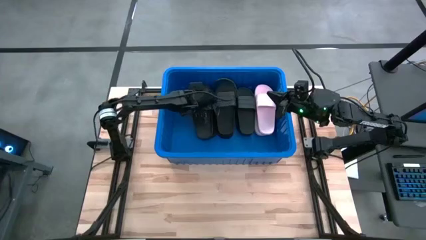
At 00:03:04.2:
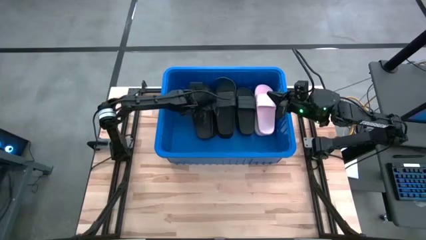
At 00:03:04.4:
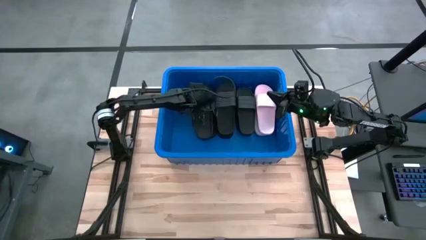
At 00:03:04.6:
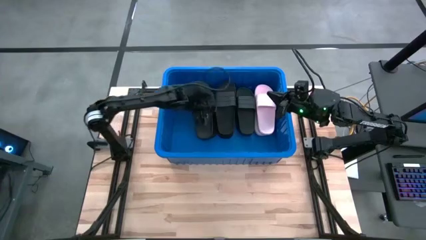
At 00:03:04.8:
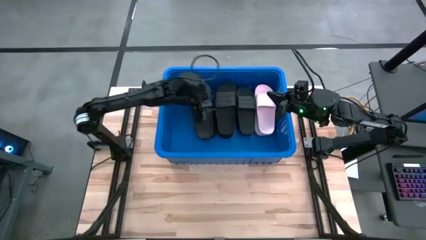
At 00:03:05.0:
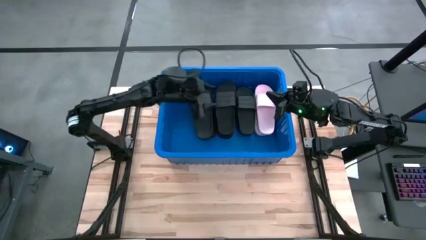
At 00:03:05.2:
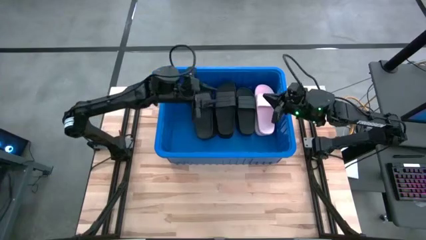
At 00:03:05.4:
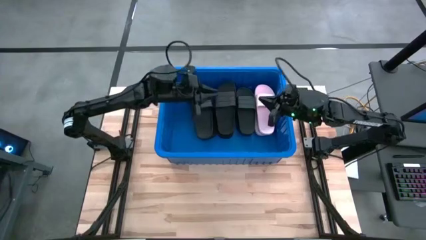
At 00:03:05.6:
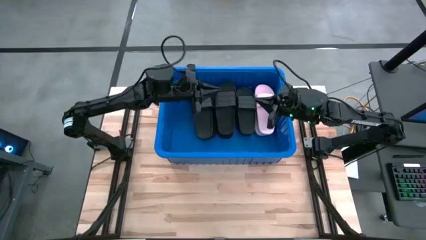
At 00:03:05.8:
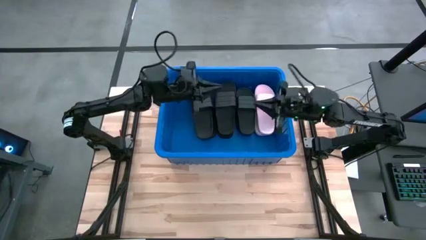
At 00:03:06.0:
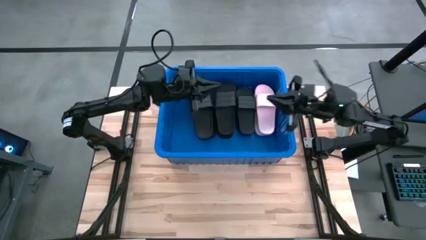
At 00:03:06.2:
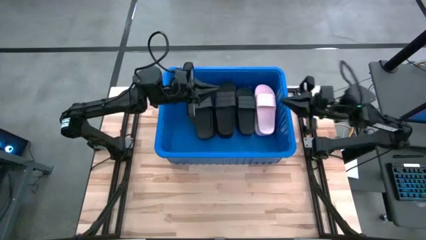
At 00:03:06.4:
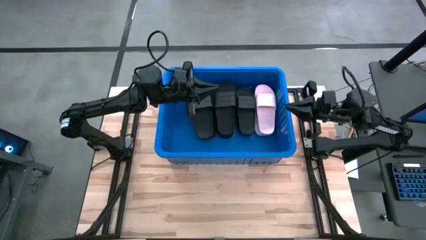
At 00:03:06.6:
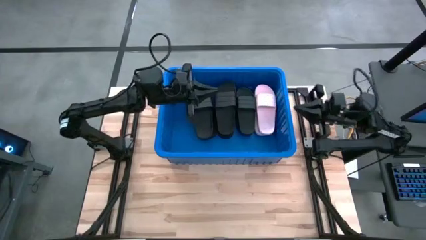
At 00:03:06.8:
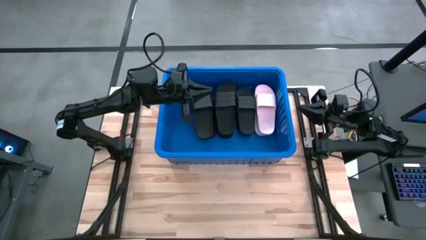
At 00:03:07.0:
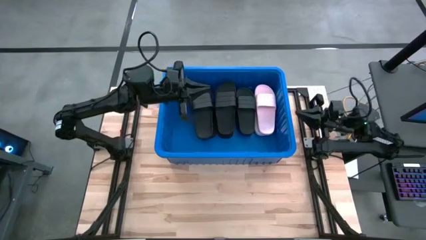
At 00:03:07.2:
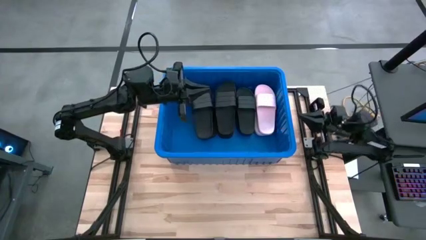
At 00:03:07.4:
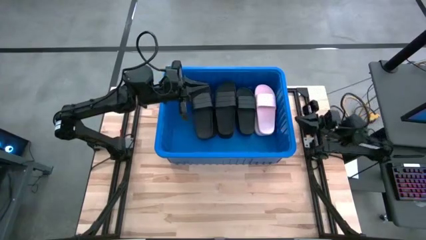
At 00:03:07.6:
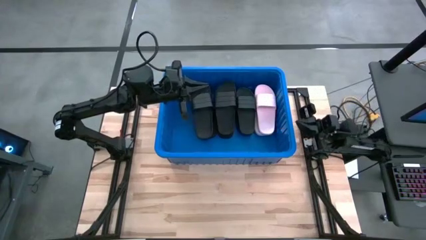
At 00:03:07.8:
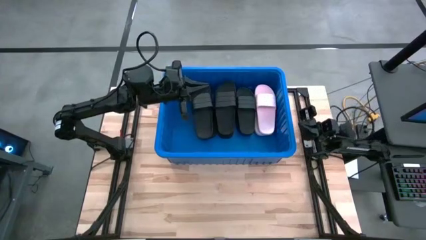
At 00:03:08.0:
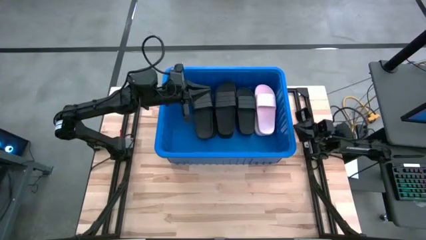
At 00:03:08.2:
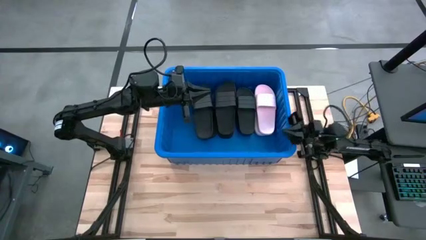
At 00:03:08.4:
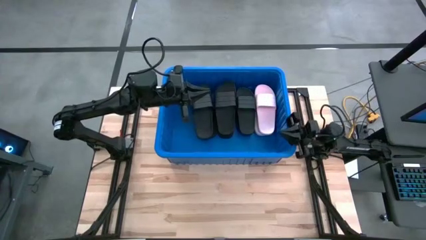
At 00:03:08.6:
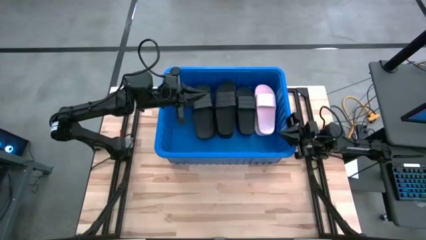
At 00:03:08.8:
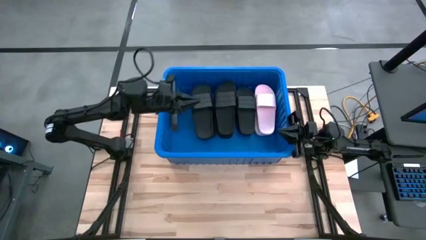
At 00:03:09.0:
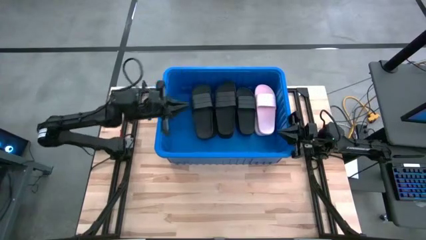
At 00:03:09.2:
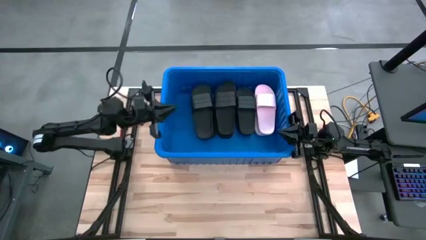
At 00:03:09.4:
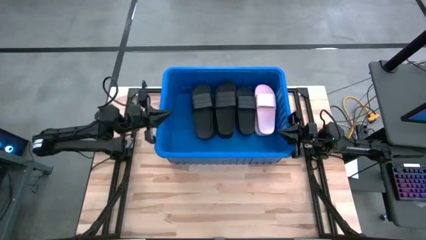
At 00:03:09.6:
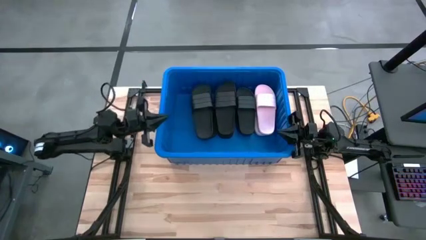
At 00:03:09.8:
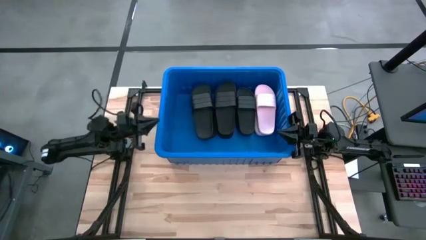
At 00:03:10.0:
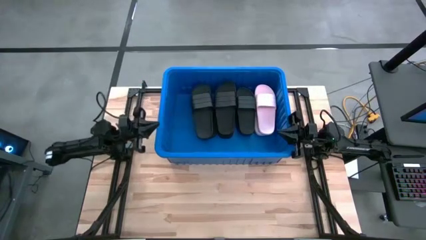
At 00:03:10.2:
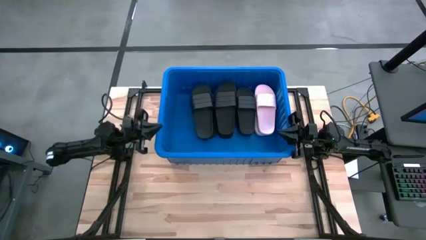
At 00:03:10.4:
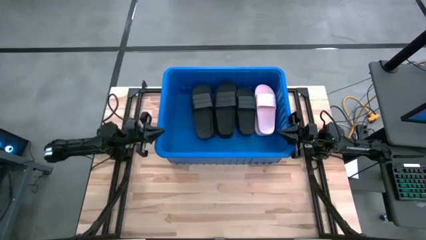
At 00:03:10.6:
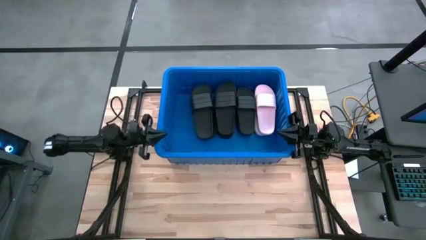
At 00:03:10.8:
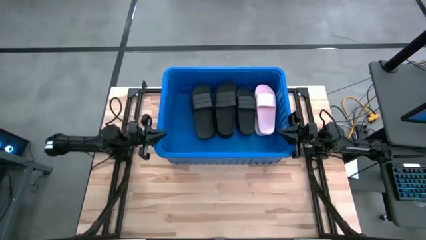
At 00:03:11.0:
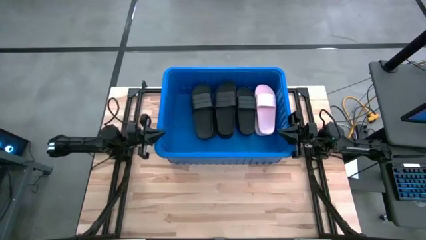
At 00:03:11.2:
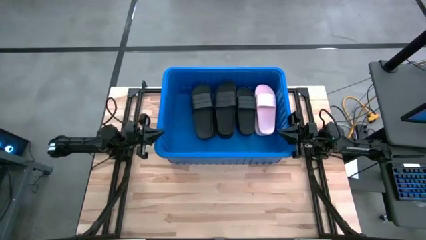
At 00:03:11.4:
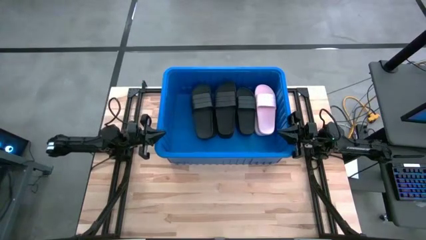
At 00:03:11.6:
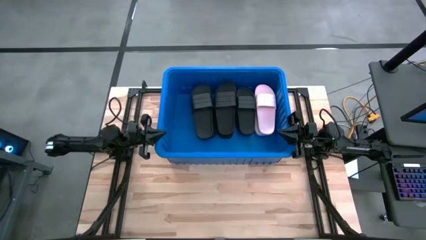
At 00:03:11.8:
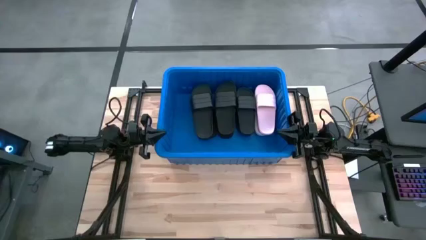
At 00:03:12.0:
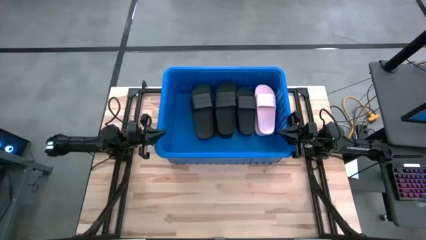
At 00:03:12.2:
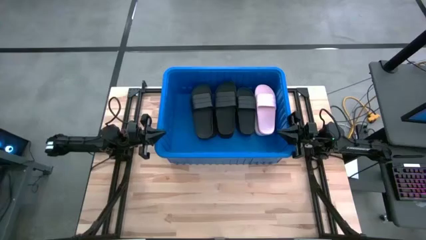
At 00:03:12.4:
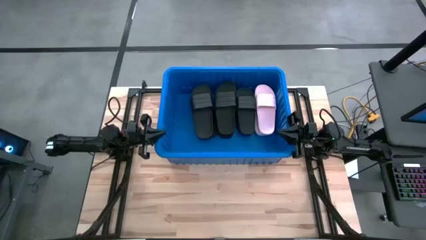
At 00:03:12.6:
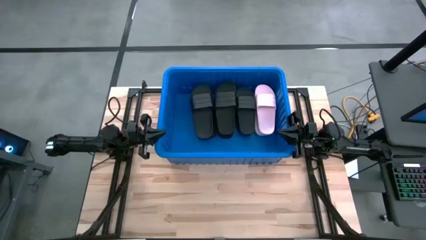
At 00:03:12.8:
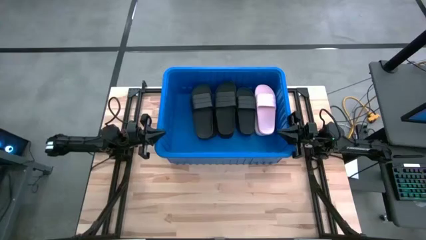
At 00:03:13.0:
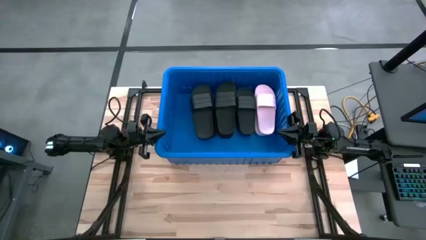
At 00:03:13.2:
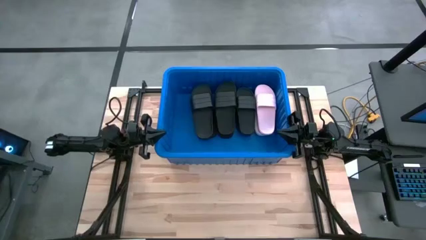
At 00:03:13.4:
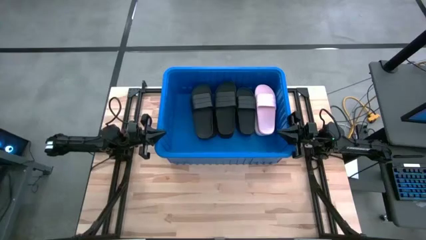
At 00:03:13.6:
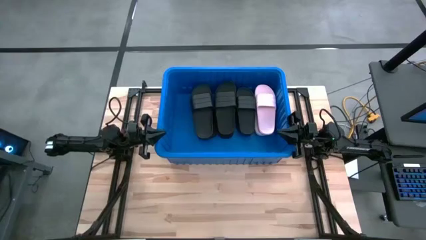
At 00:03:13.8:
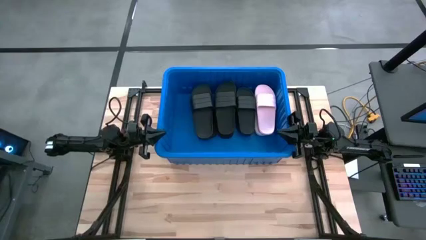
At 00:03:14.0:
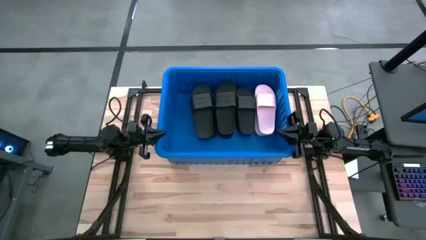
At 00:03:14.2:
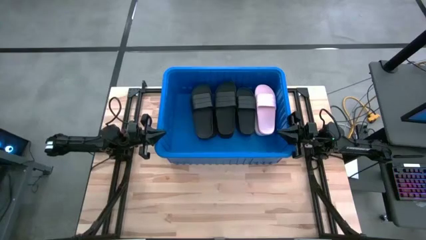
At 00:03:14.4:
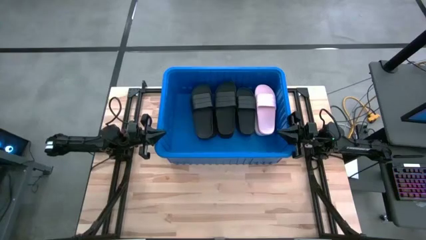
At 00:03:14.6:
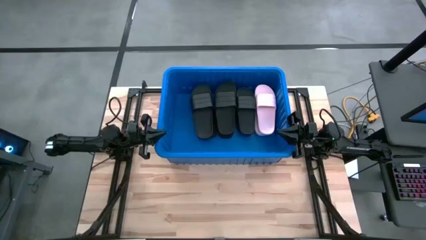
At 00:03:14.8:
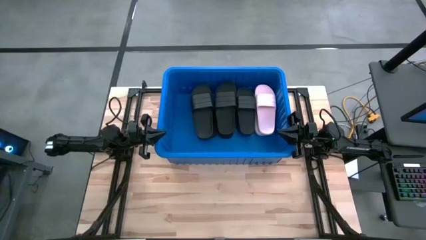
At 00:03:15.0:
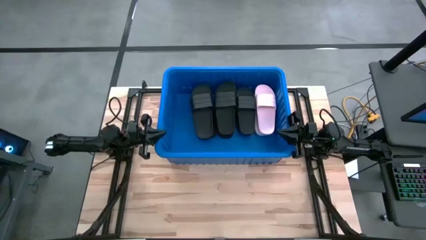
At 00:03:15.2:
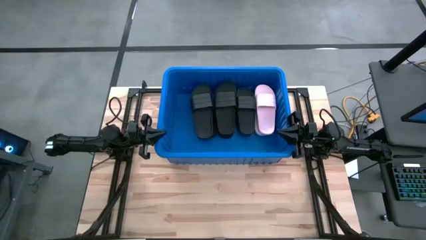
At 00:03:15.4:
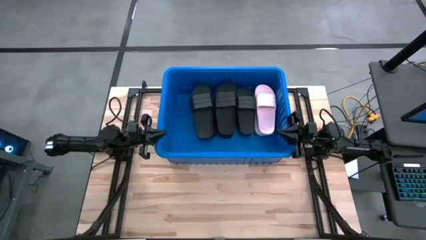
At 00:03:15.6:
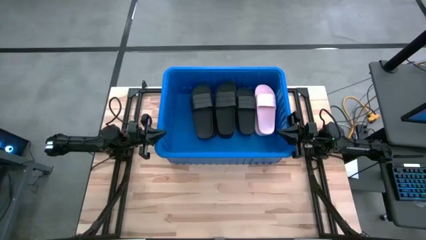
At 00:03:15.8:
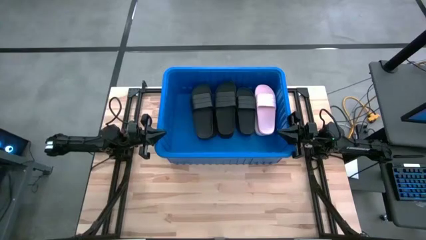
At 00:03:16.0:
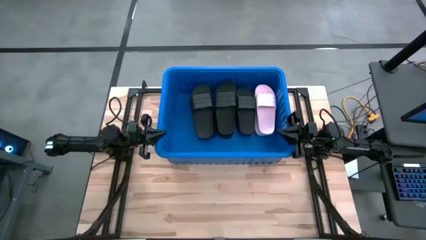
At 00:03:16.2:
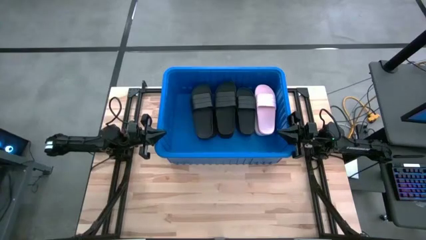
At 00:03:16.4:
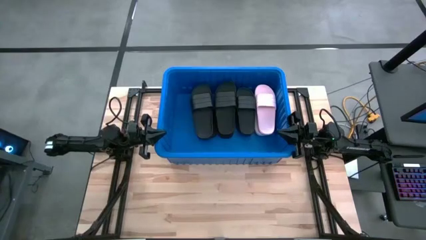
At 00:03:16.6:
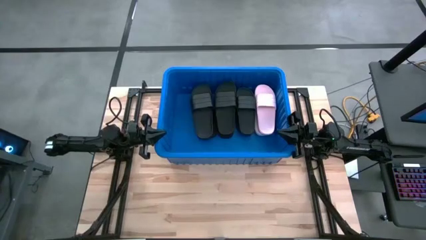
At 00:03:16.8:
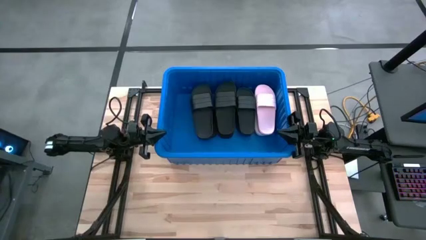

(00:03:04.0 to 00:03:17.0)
Task: Pick and place slides into bin
Return to Home Position
